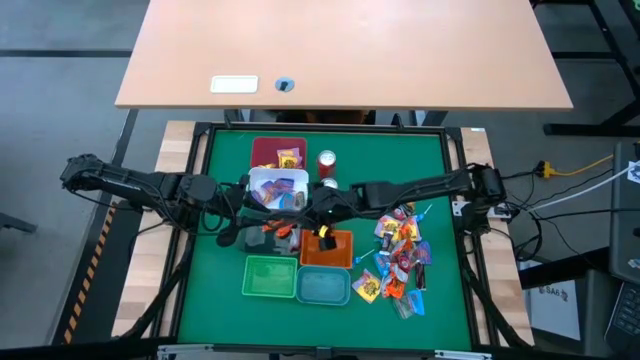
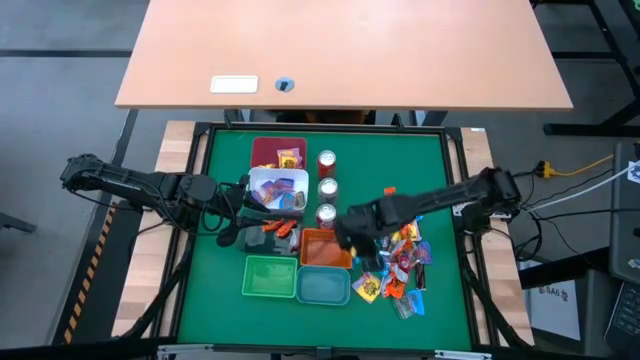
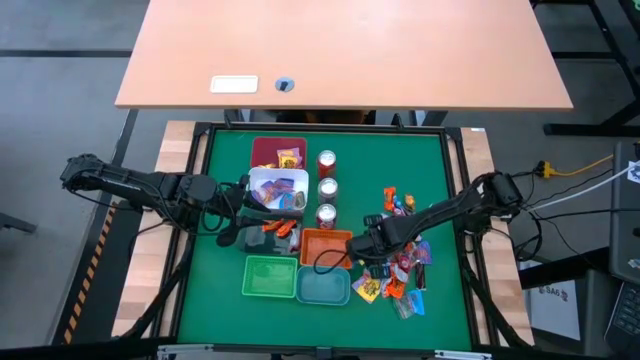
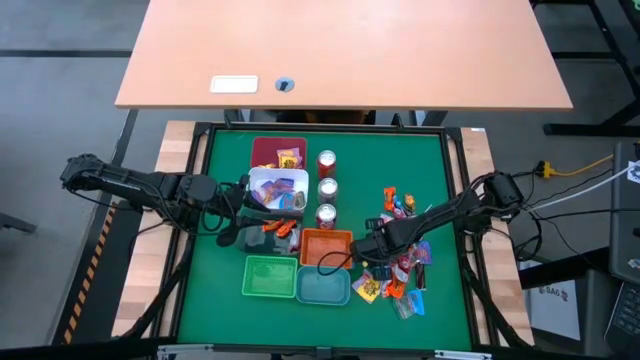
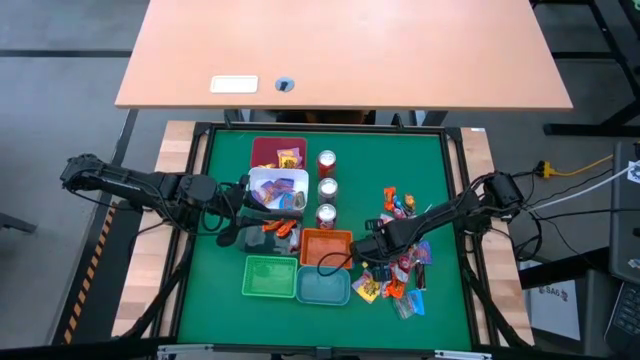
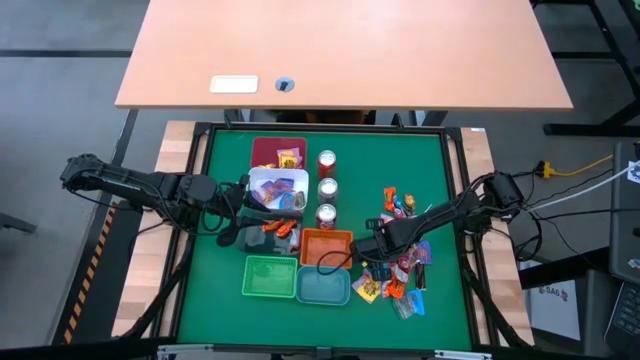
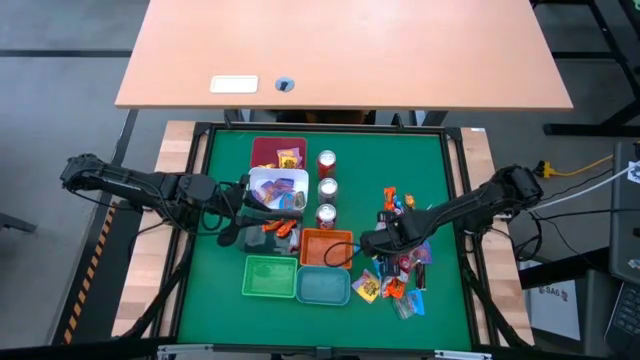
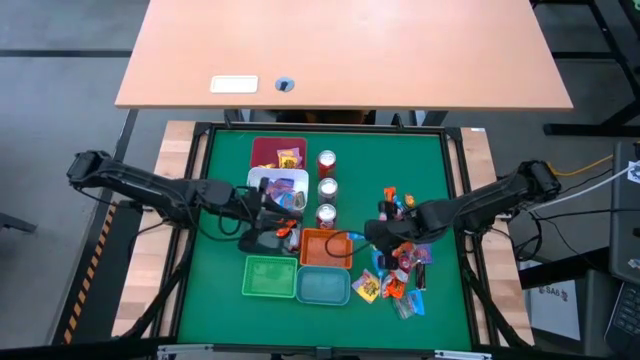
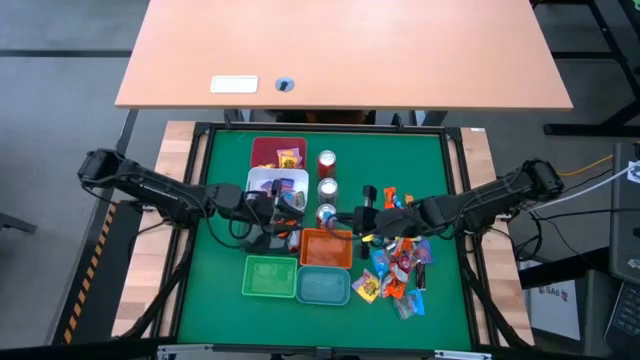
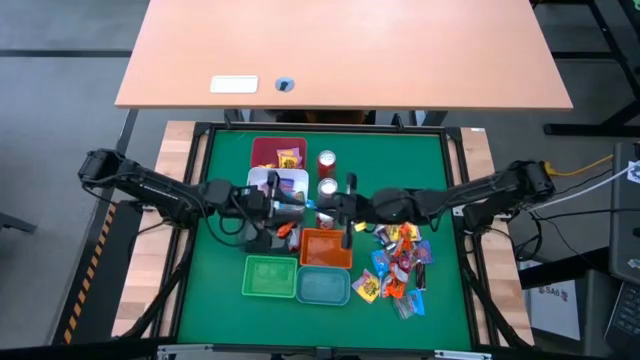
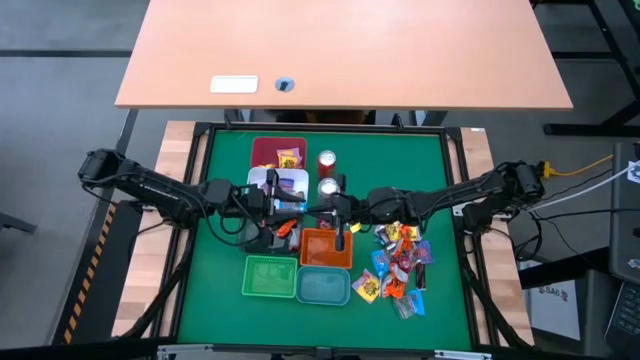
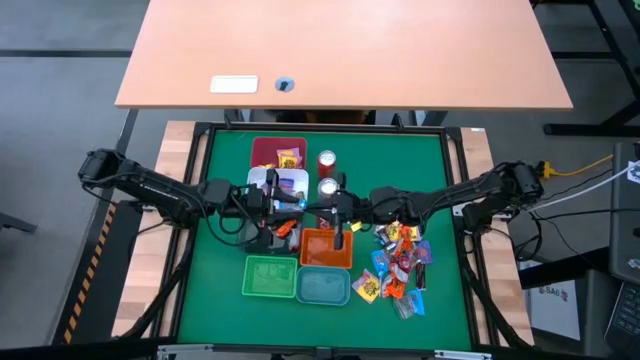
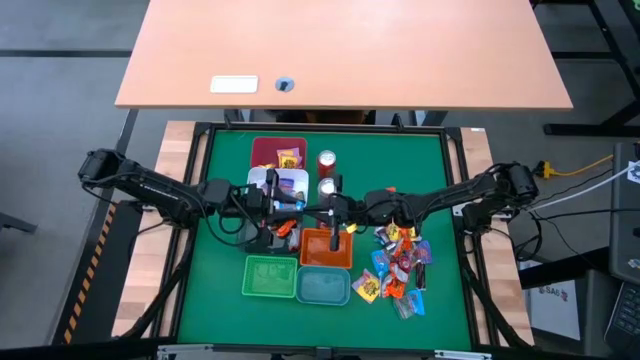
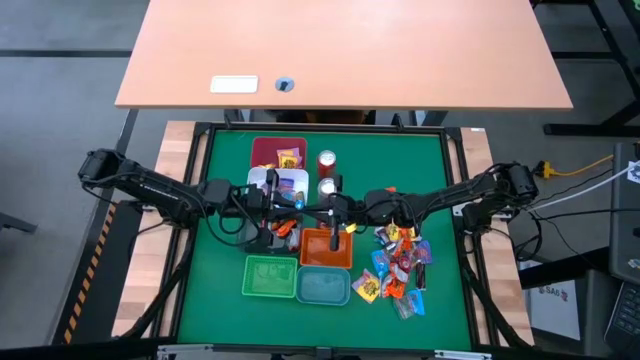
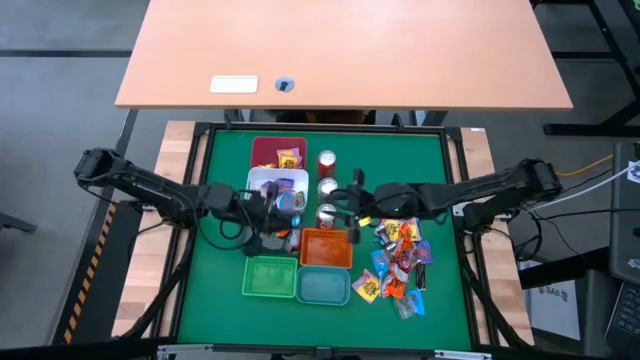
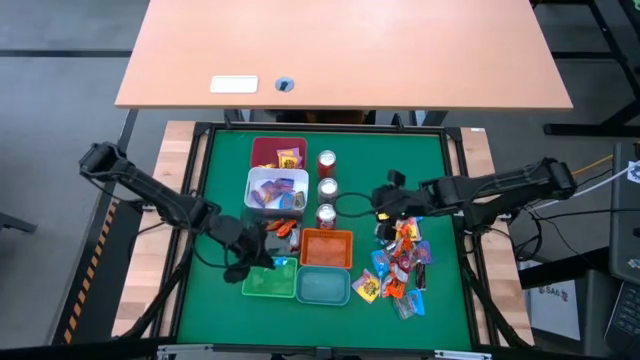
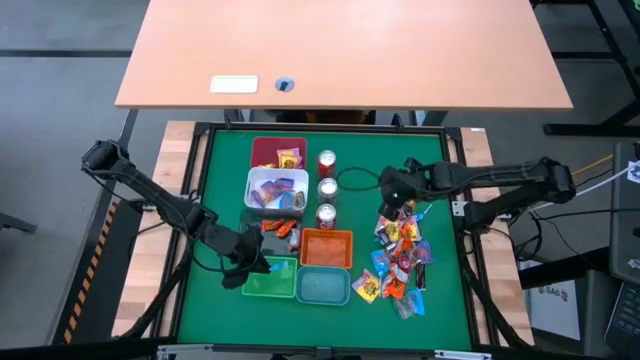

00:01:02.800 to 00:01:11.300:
Task: Sort candy
Put the blue candy into the green bin

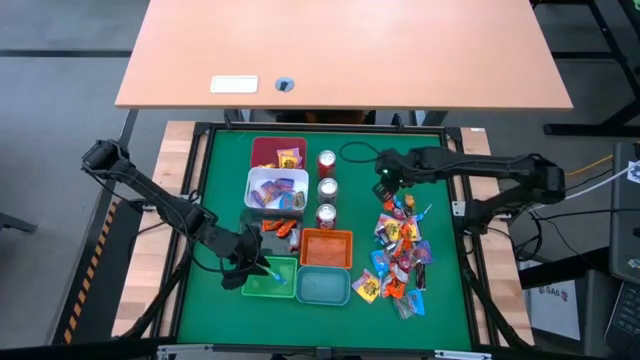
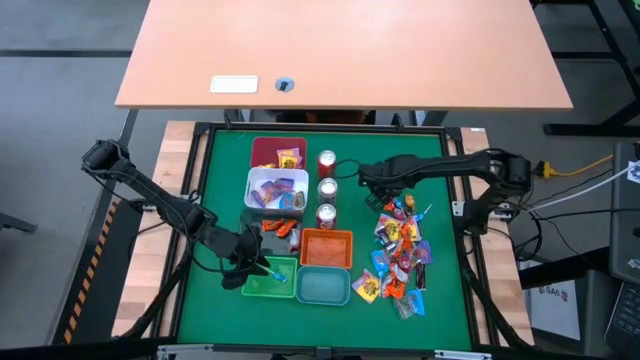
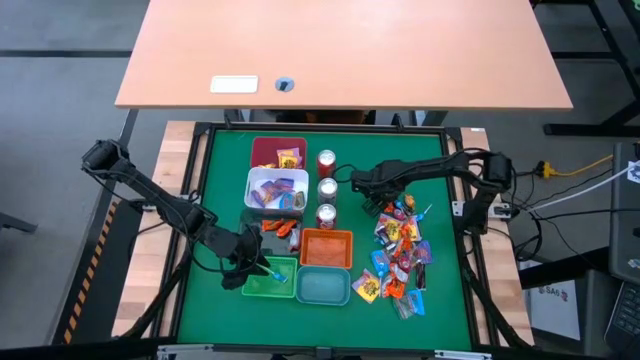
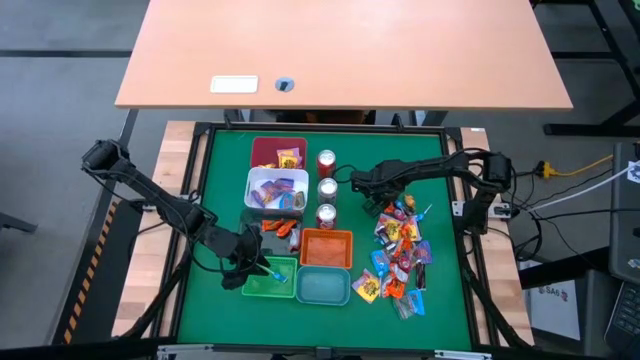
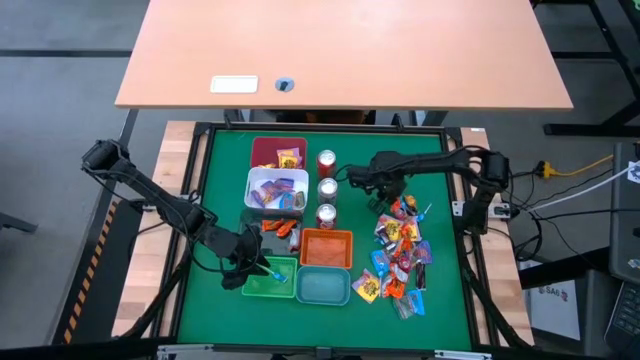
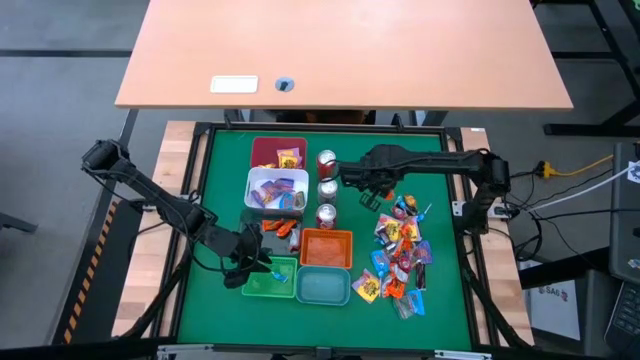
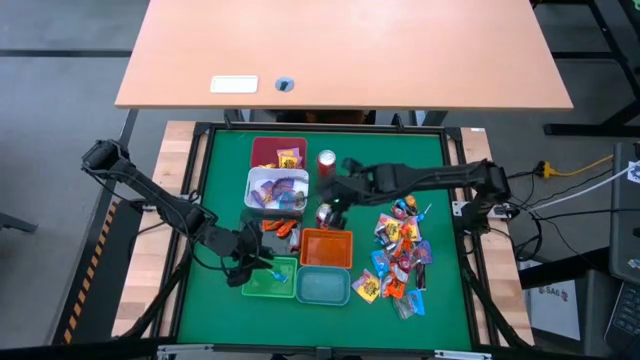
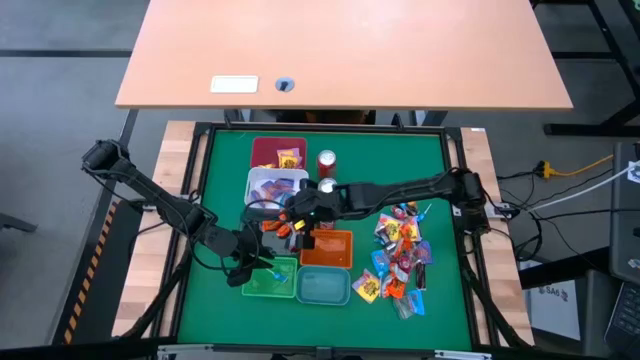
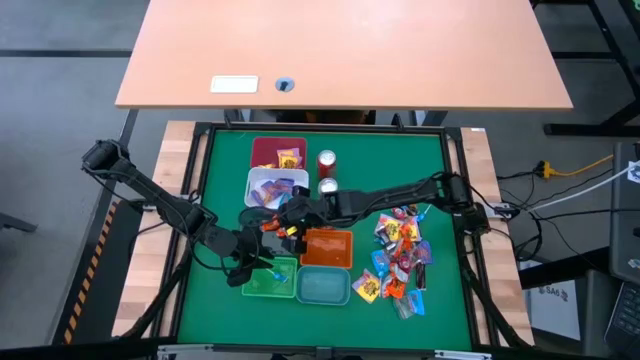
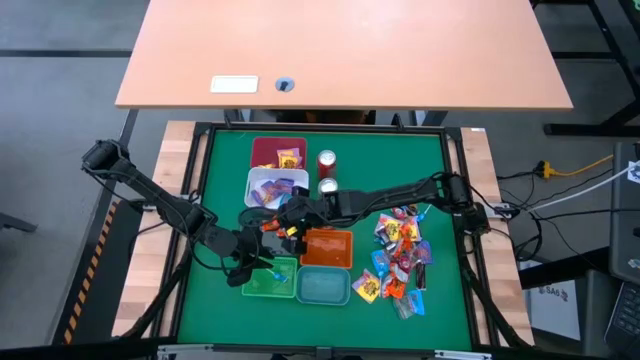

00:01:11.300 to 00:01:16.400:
Put the orange chocolate into the black bin

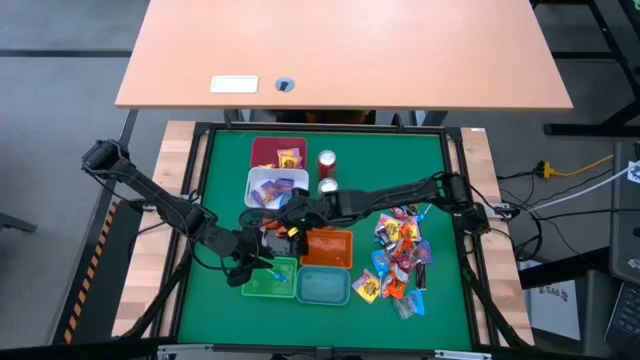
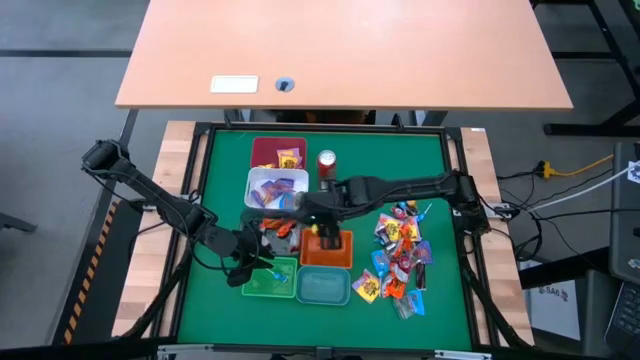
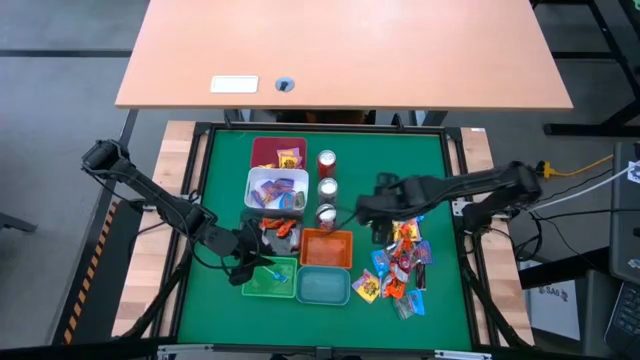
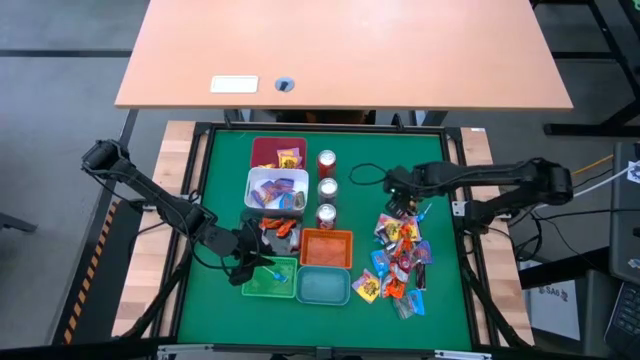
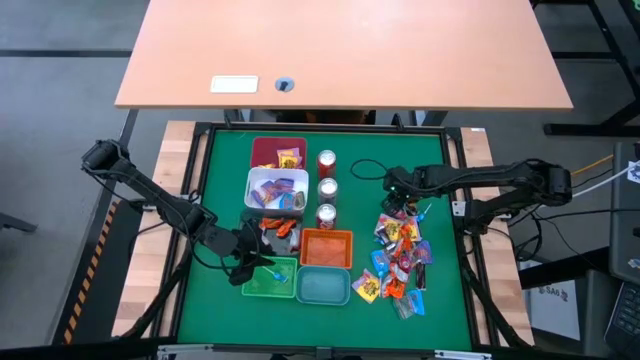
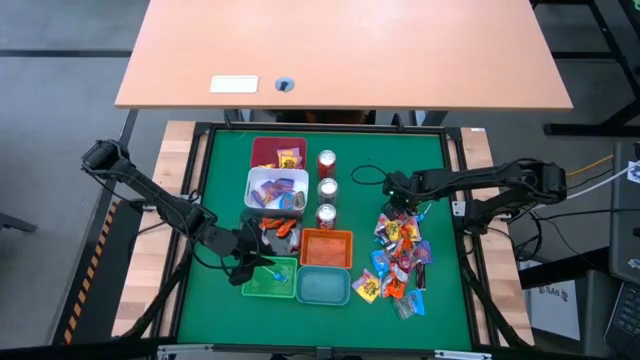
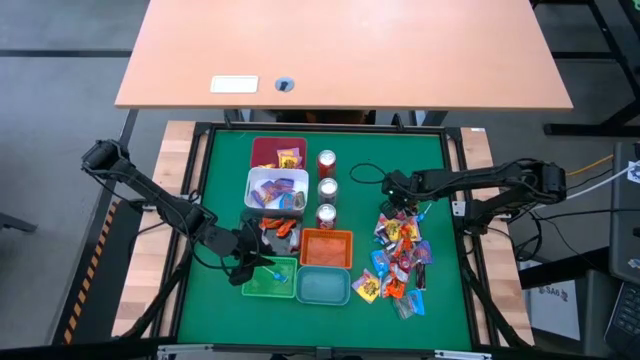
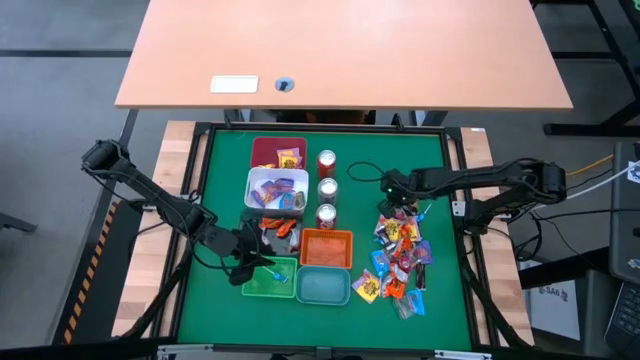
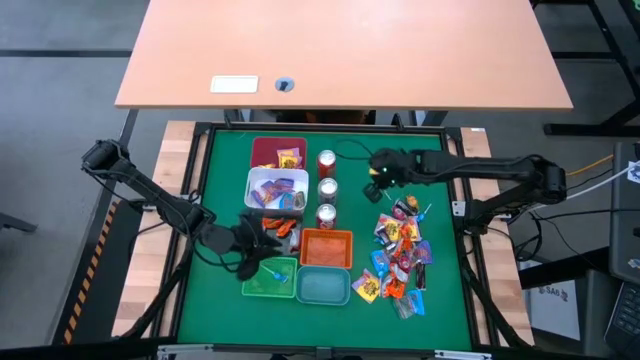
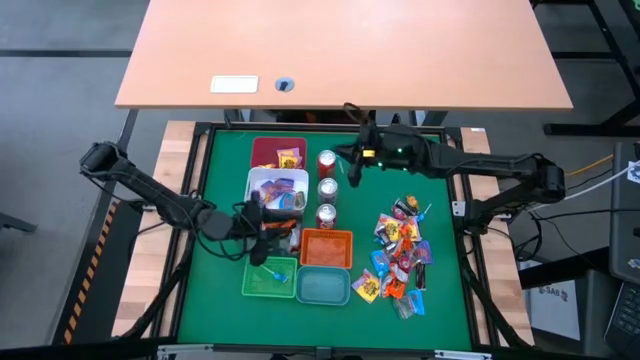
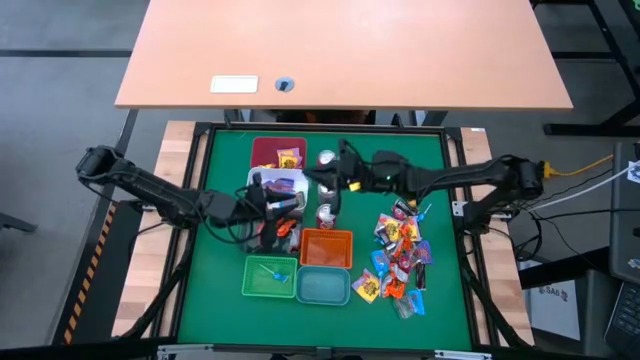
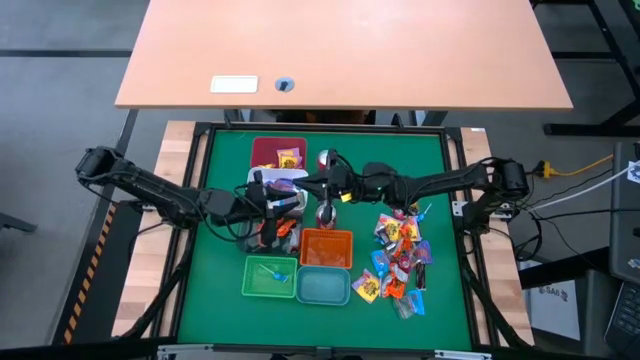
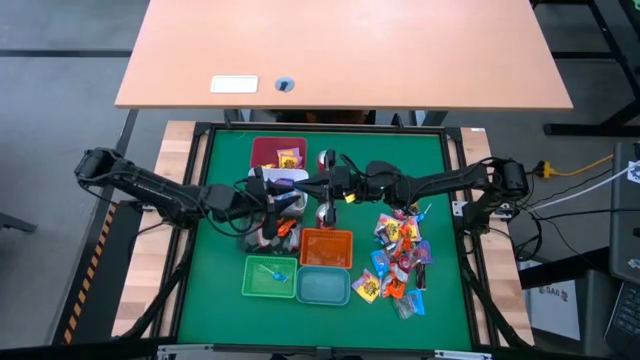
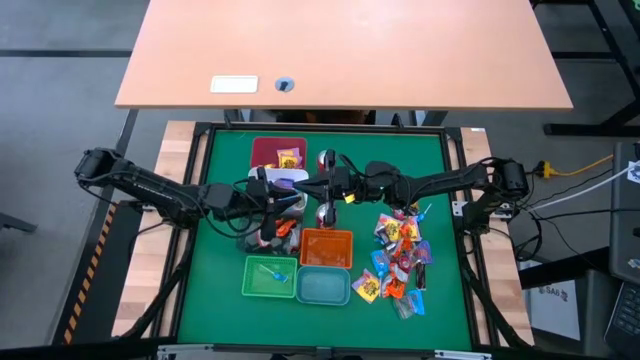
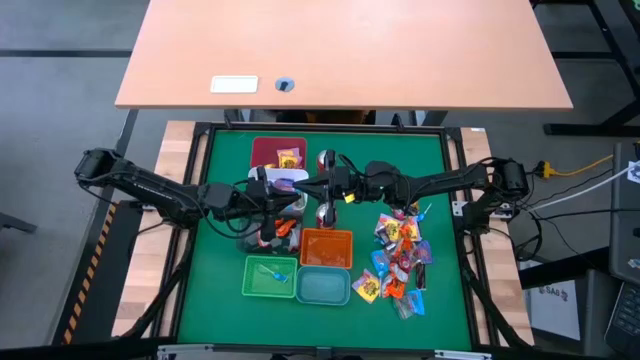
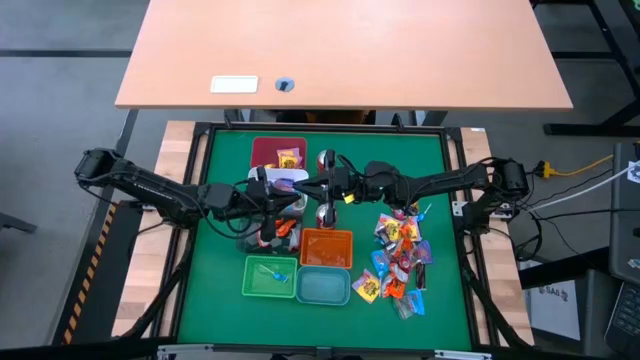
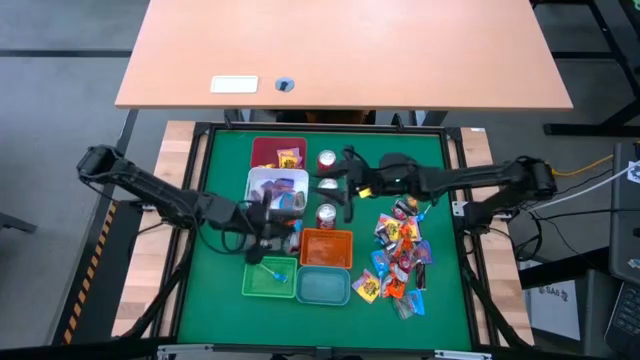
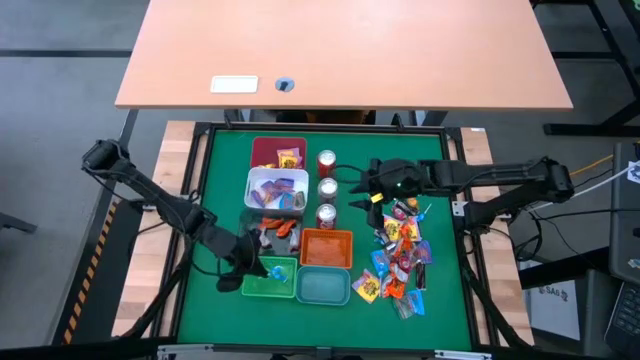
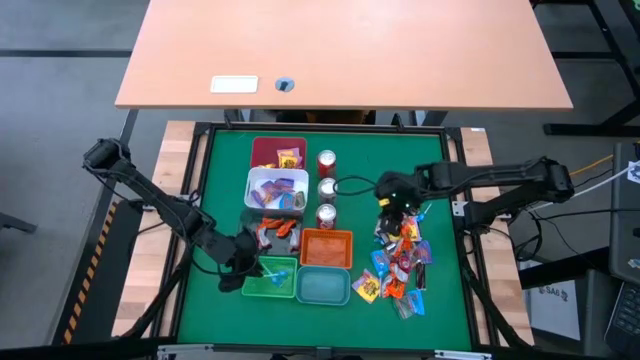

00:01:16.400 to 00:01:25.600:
Put the blue candy into the green bin
